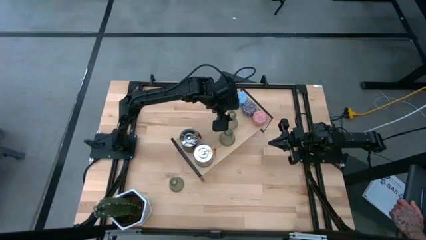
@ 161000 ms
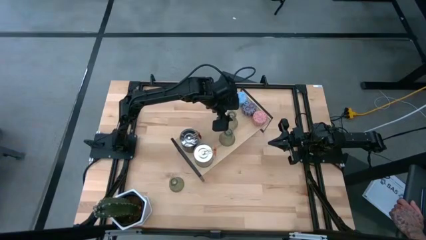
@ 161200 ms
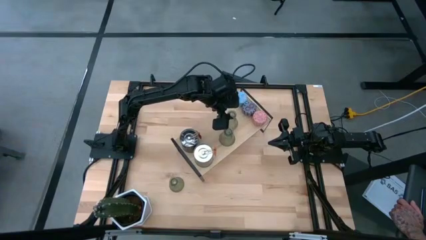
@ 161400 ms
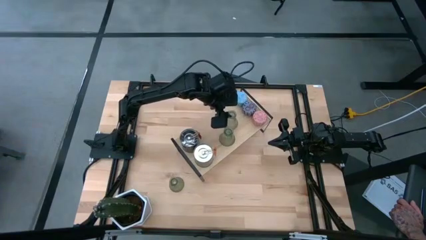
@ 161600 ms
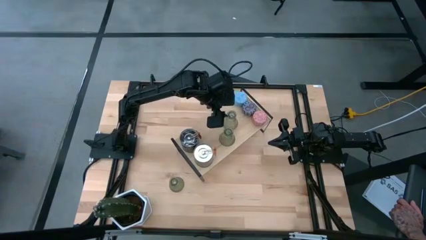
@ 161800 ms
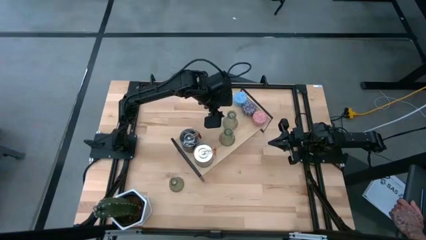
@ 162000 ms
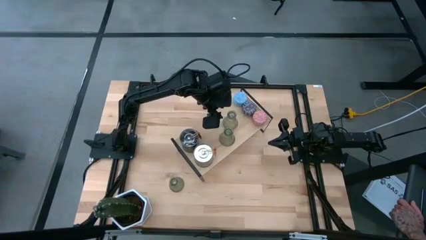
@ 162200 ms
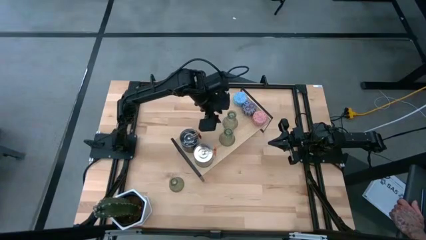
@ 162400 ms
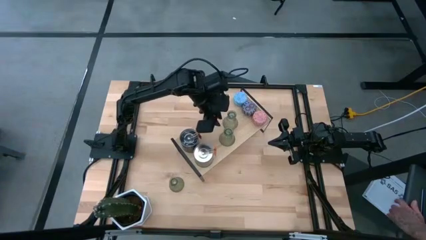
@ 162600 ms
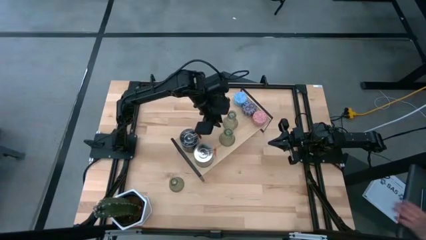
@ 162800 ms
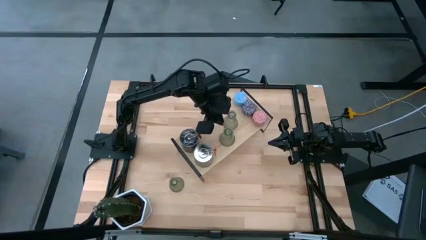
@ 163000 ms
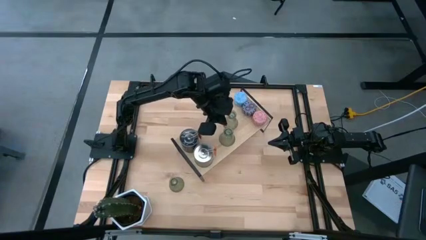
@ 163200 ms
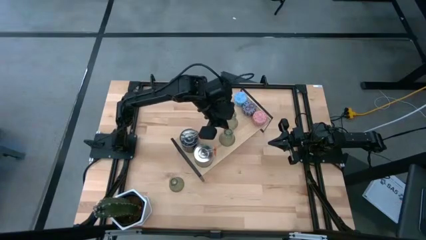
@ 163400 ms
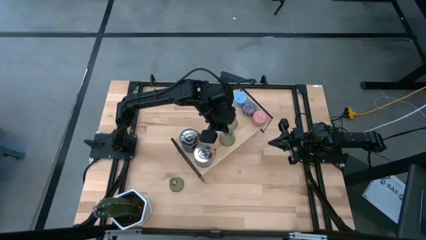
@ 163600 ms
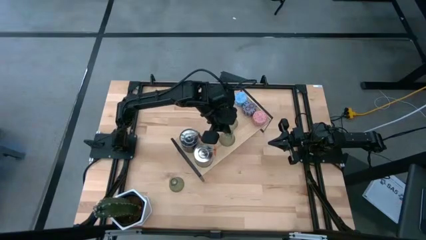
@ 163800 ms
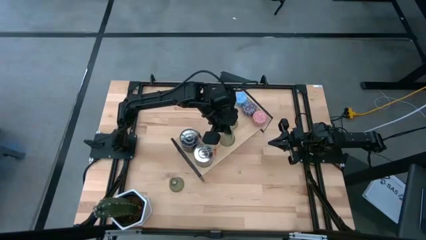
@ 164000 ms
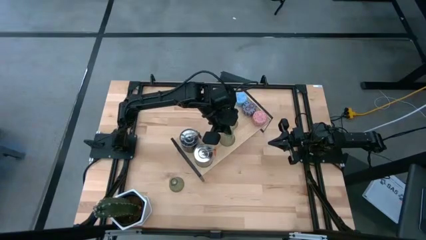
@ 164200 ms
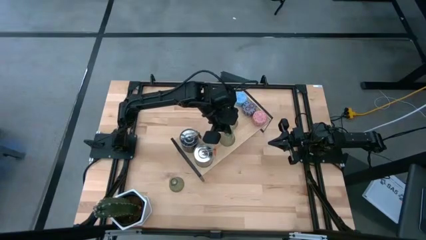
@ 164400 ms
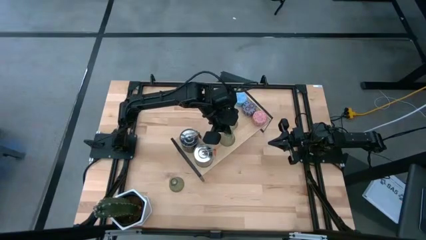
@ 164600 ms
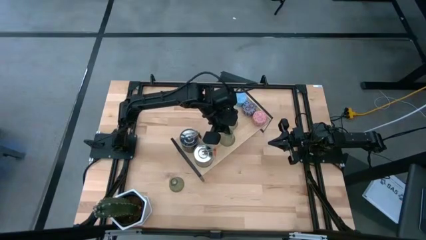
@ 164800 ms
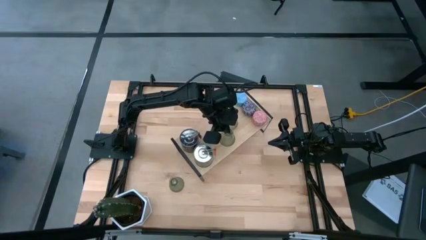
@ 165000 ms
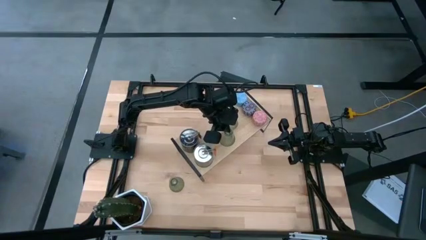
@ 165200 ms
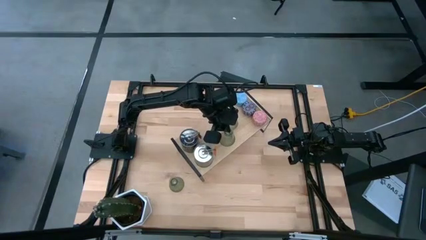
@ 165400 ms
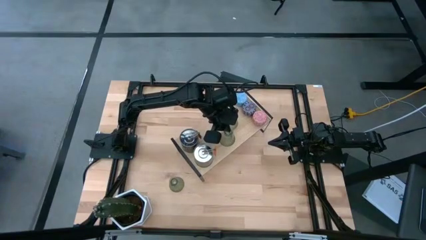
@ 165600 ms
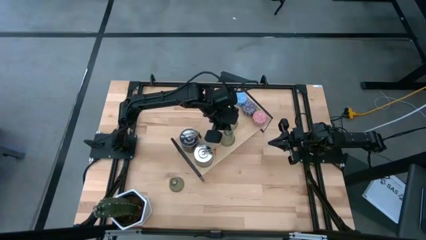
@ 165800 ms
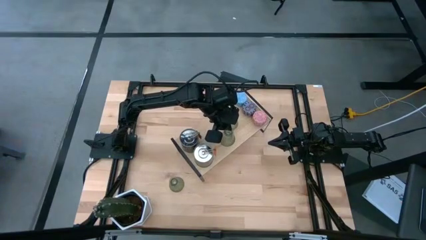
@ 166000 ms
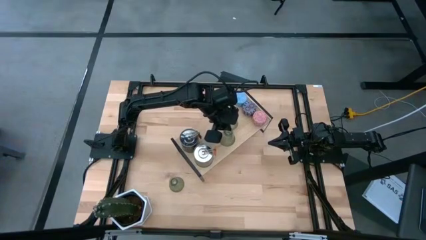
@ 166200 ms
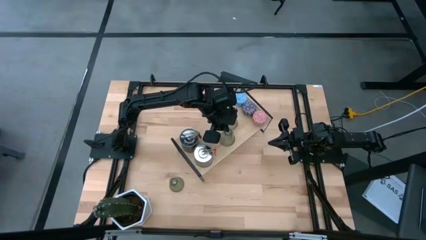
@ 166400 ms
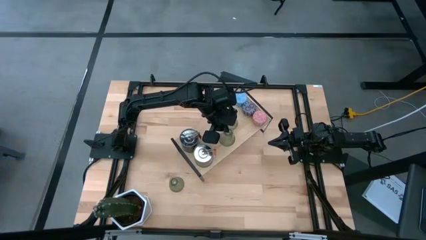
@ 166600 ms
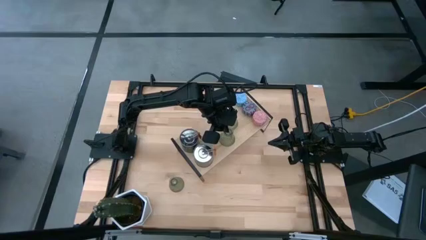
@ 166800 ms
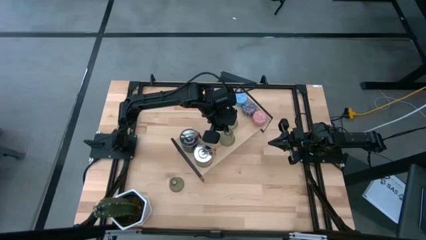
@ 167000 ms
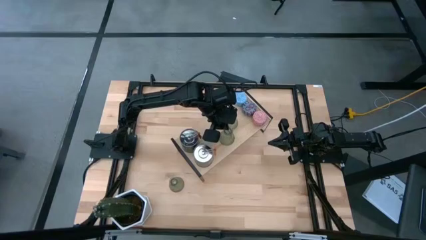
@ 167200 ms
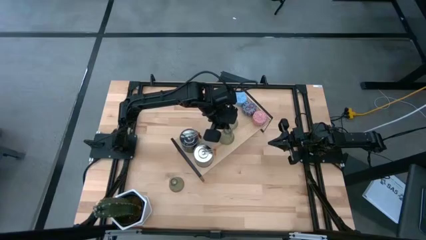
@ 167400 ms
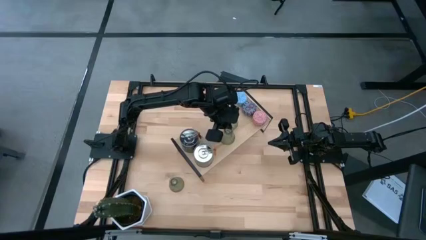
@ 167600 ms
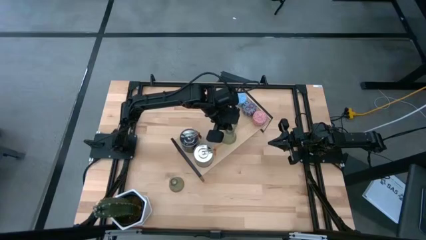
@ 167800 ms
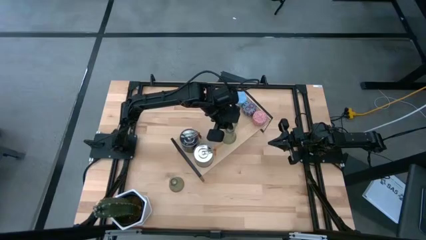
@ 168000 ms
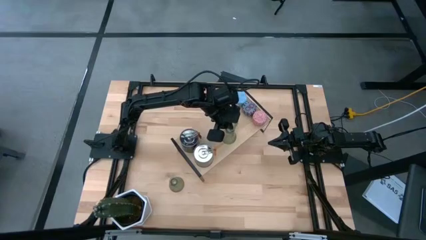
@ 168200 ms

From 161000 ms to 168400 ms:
Task: Pick & Place candle stick holders
Adjust the transparent candle holder on the shelf

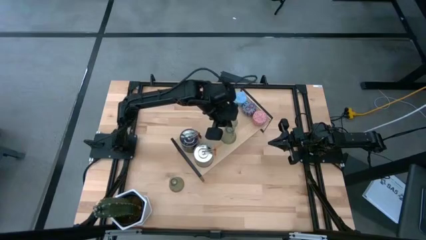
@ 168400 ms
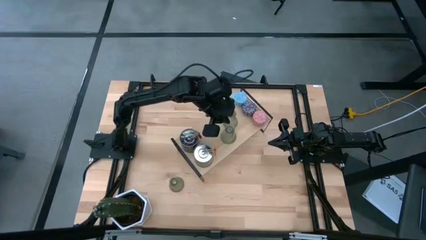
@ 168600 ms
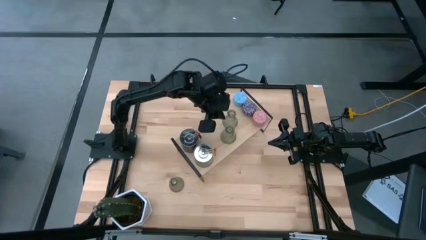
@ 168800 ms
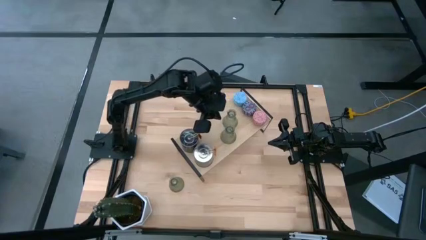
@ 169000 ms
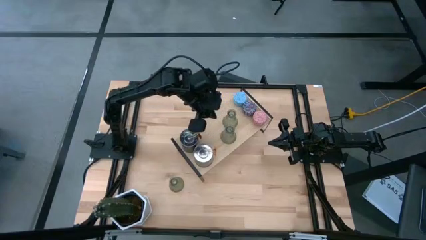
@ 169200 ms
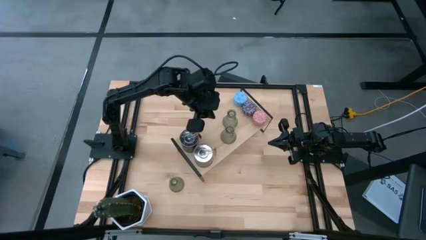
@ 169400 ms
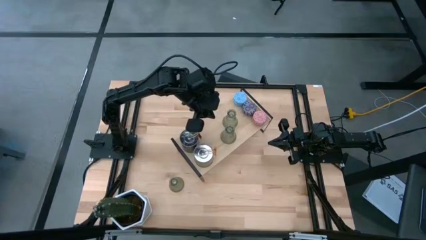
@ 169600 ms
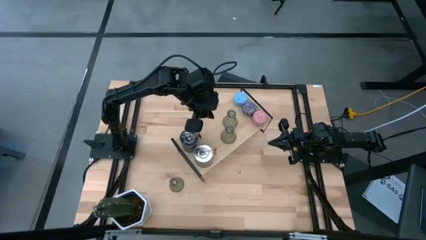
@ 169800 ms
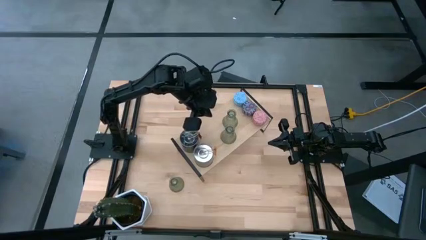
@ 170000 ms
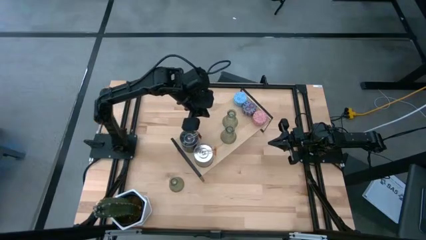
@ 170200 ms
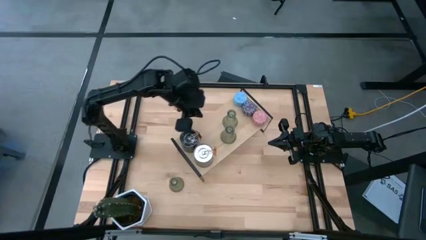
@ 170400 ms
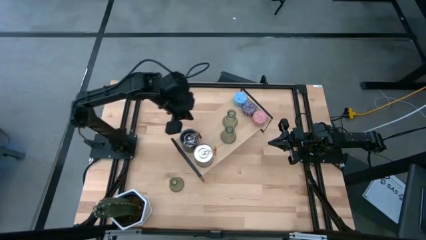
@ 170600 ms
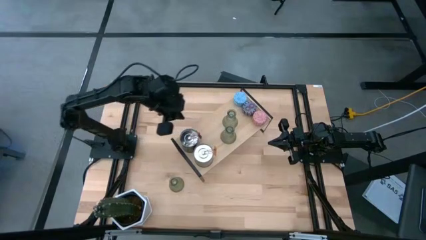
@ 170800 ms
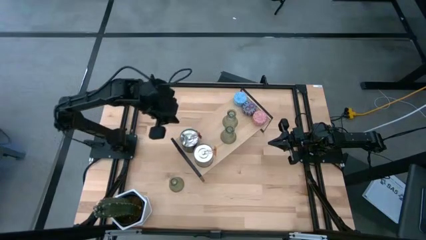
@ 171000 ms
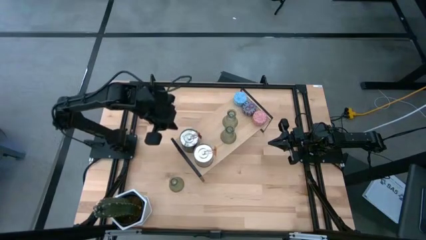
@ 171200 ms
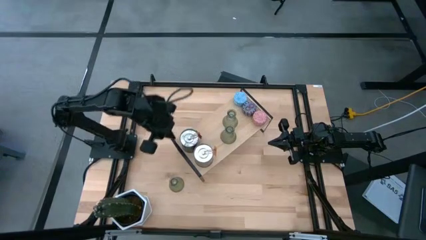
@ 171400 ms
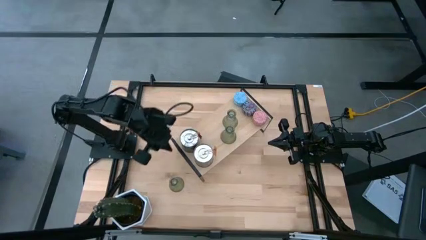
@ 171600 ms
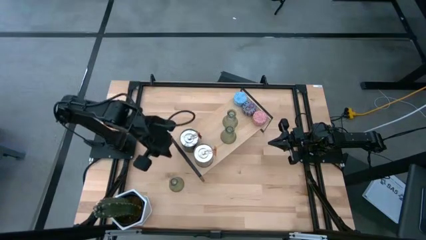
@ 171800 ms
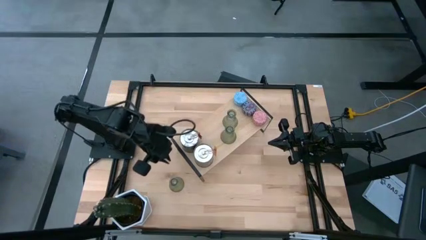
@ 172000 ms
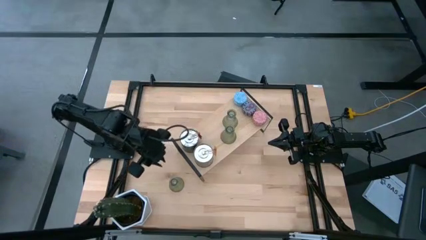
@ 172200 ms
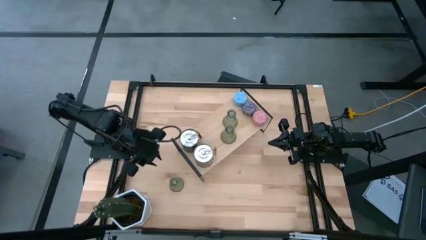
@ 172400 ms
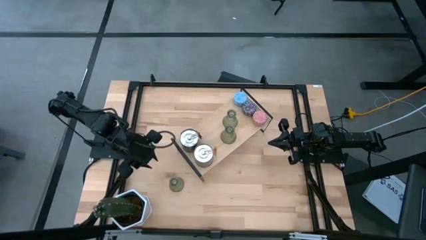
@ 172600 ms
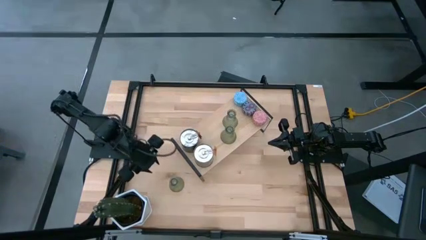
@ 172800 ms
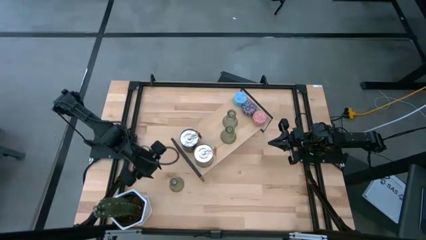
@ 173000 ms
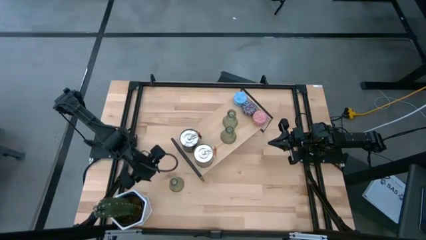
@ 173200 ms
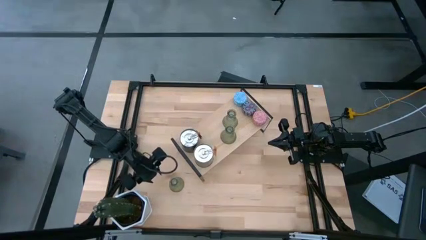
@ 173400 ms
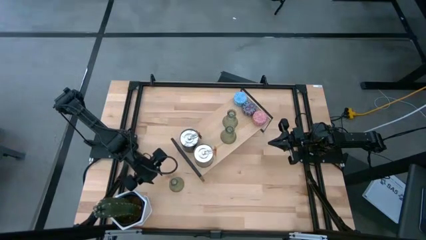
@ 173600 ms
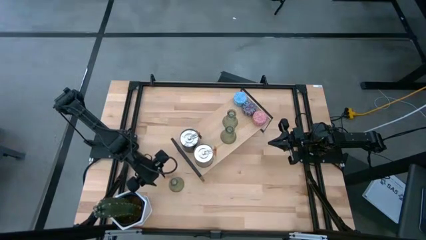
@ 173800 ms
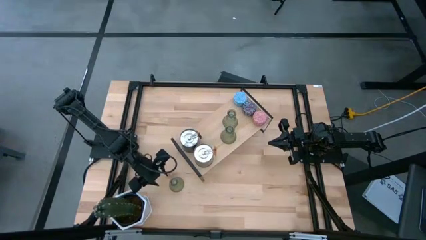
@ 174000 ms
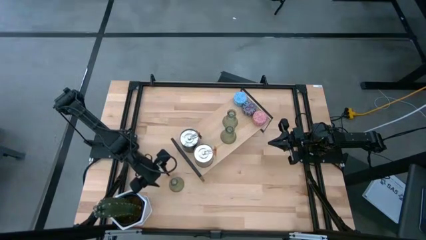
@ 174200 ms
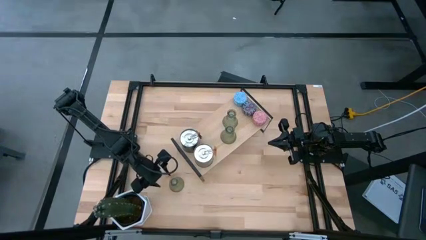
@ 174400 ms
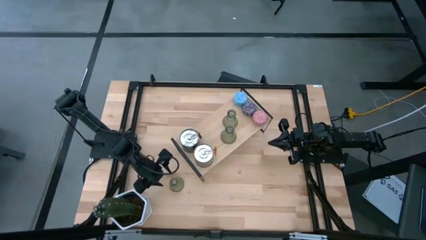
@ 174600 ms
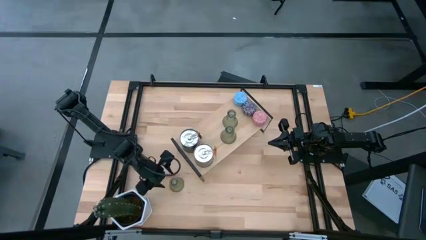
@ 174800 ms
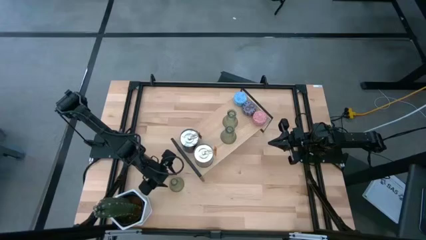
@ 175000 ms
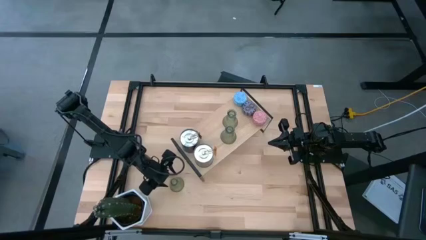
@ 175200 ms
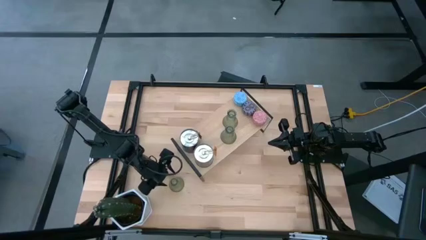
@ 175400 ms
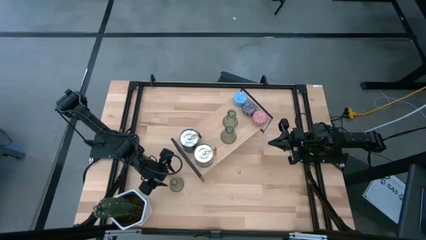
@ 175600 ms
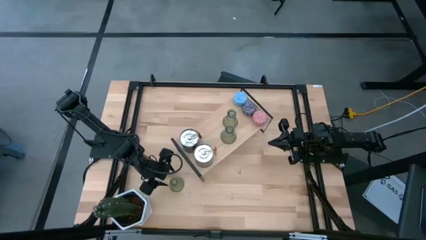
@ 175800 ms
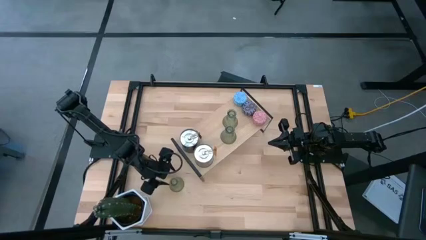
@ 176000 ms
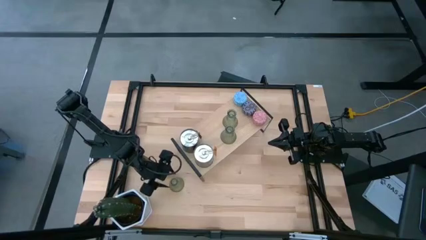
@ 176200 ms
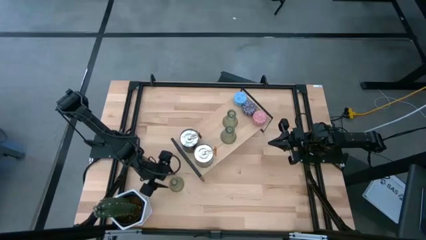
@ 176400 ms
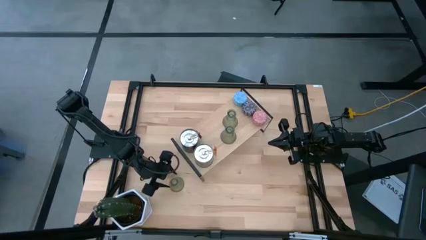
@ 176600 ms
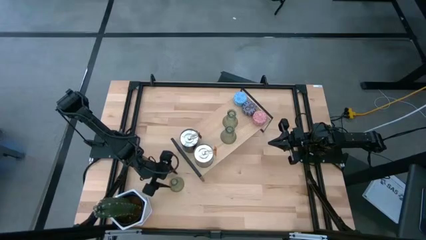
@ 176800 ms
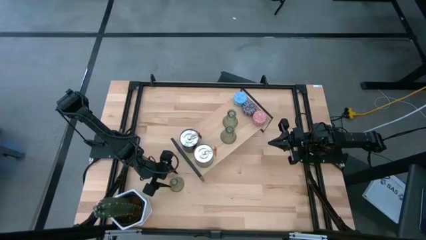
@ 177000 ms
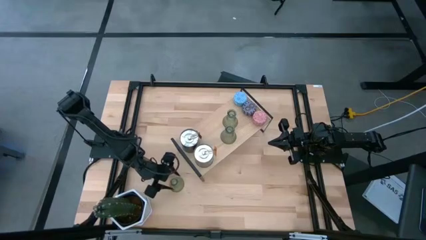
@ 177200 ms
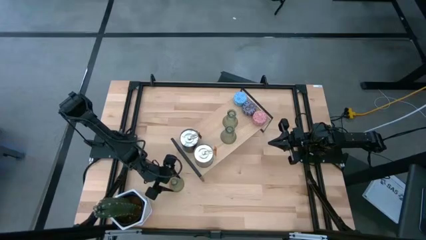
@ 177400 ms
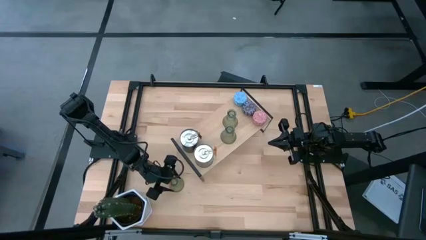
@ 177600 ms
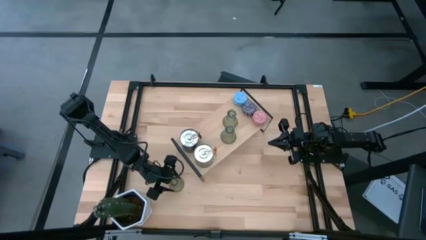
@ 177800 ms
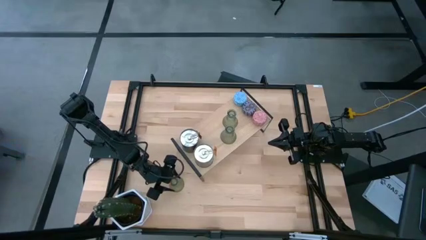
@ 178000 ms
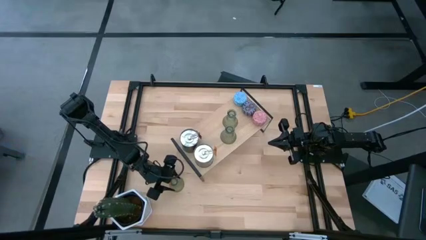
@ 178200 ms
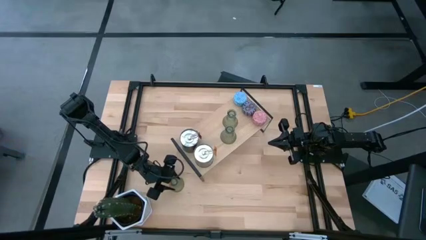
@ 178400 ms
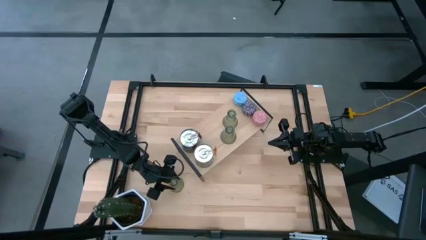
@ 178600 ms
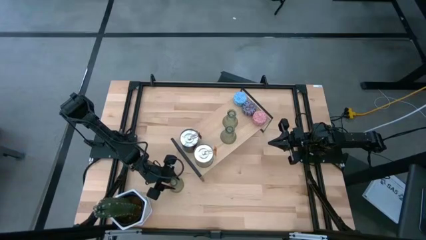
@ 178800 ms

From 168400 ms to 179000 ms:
Put the transparent candle holder on the shelf
